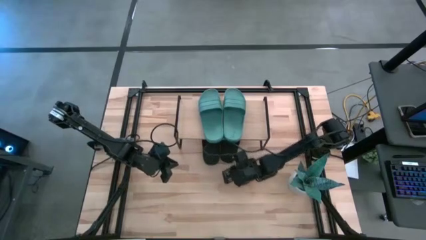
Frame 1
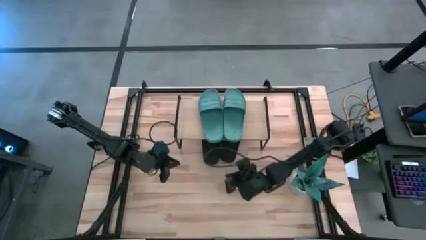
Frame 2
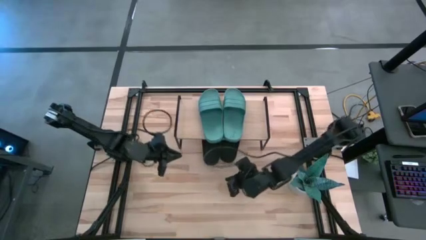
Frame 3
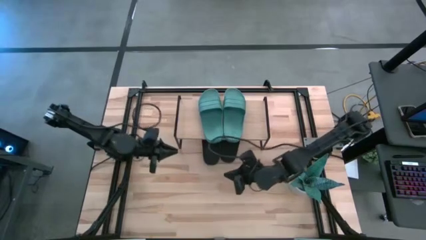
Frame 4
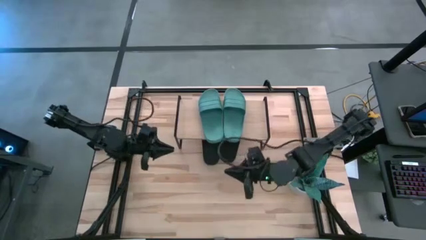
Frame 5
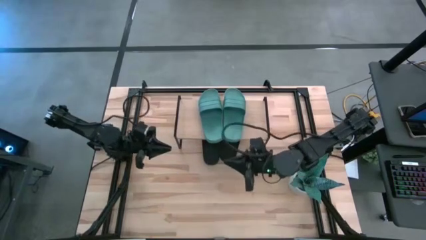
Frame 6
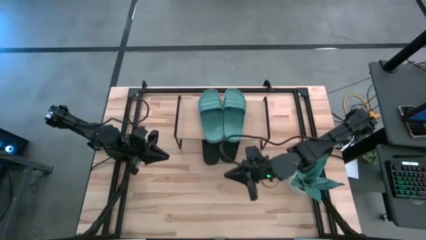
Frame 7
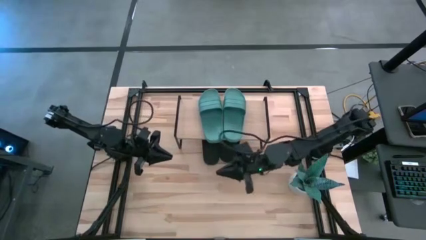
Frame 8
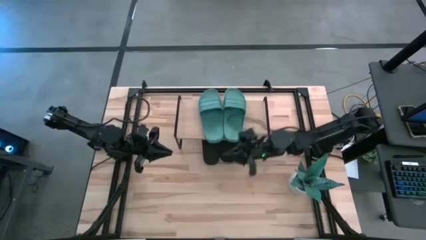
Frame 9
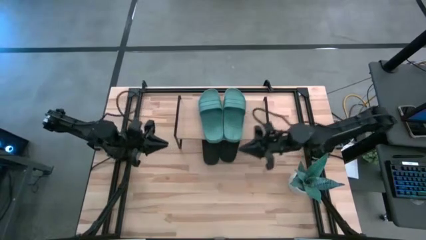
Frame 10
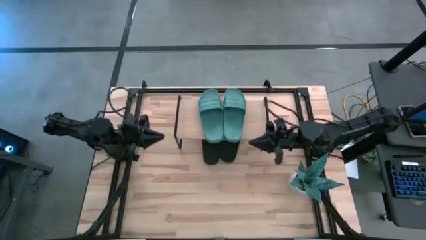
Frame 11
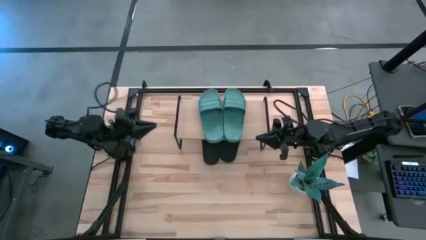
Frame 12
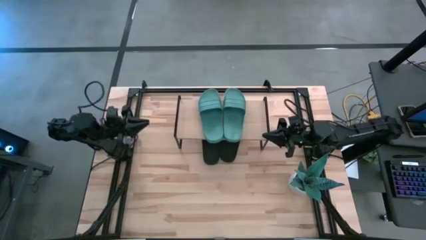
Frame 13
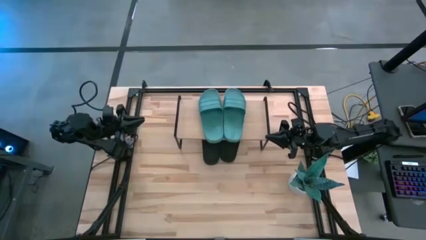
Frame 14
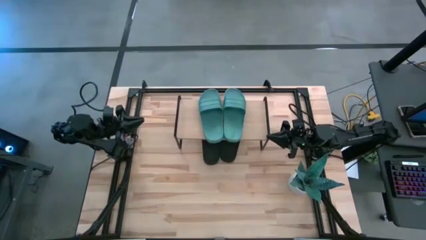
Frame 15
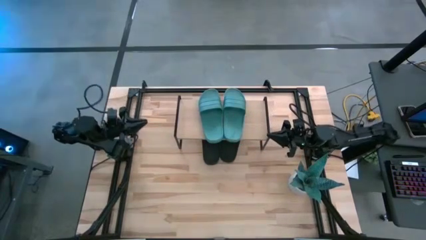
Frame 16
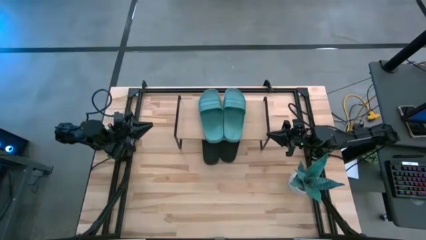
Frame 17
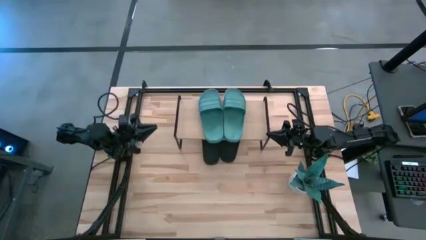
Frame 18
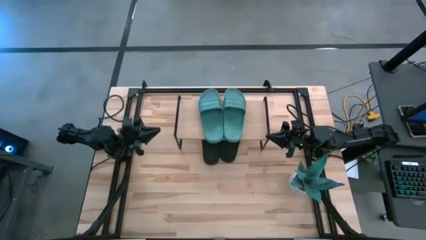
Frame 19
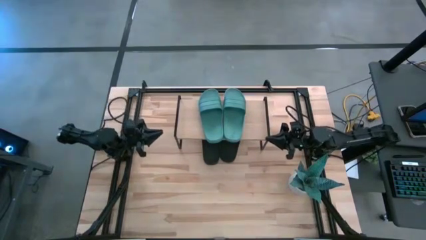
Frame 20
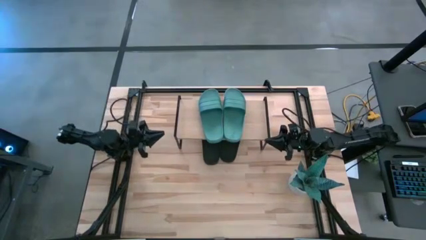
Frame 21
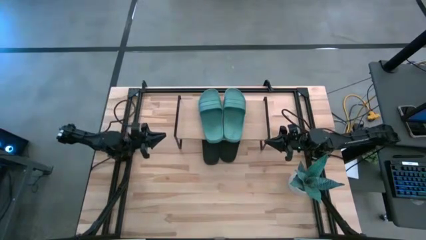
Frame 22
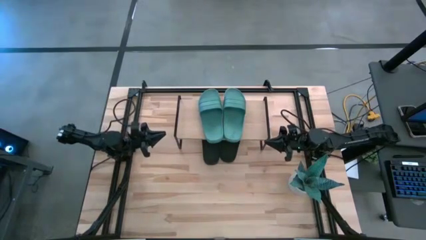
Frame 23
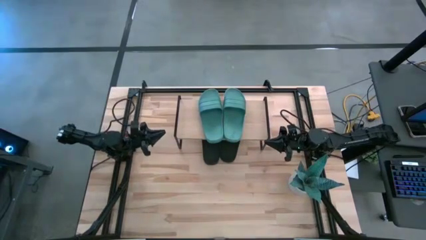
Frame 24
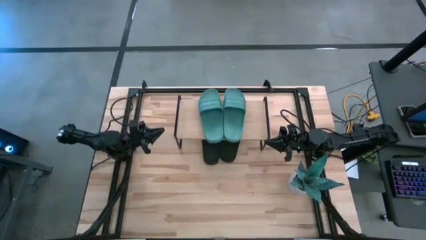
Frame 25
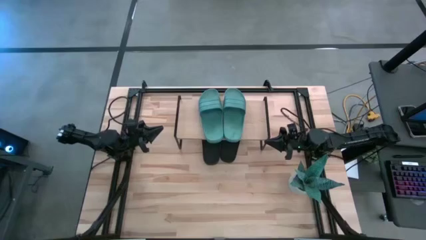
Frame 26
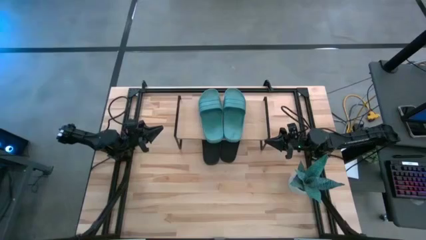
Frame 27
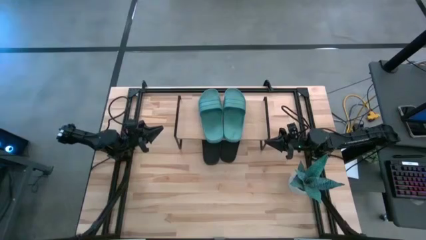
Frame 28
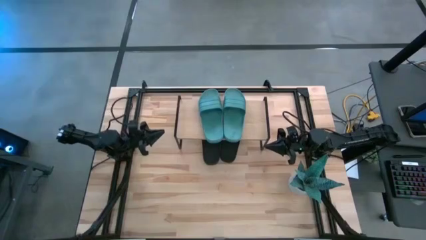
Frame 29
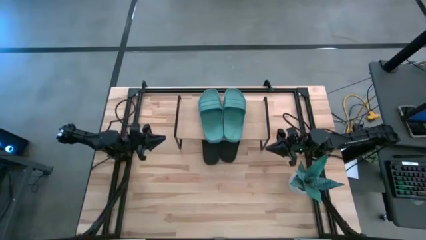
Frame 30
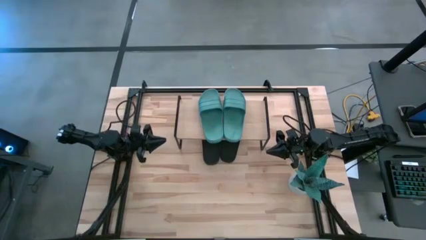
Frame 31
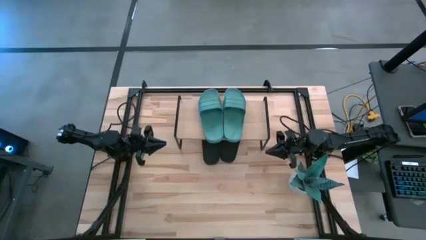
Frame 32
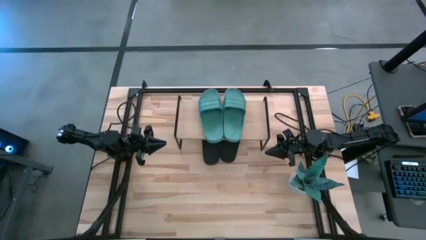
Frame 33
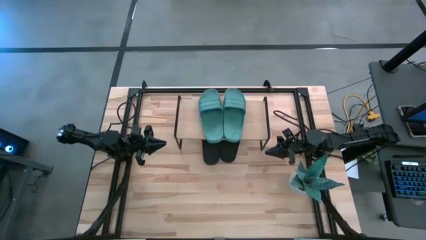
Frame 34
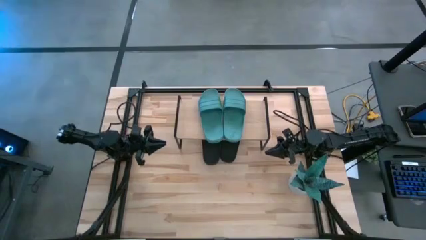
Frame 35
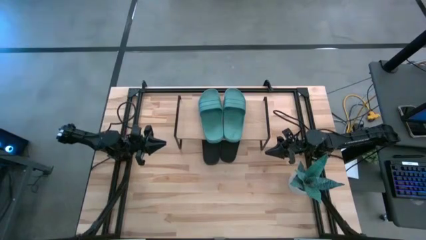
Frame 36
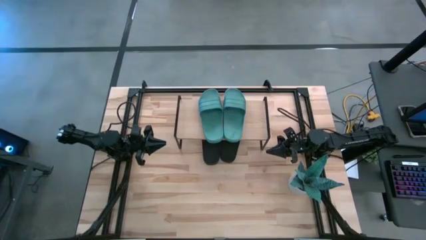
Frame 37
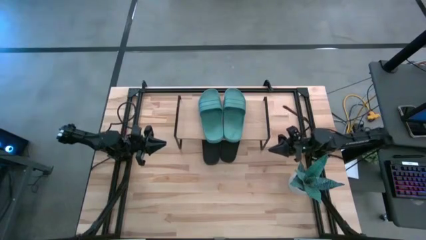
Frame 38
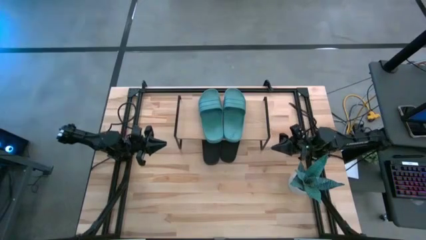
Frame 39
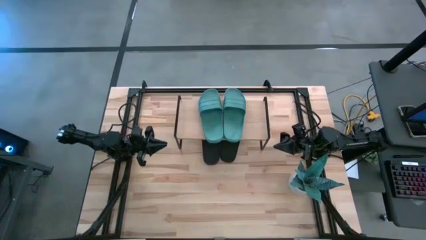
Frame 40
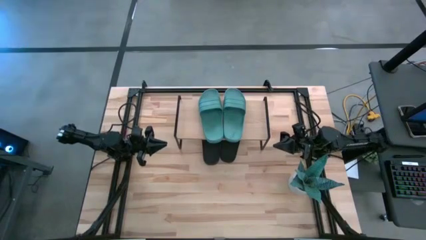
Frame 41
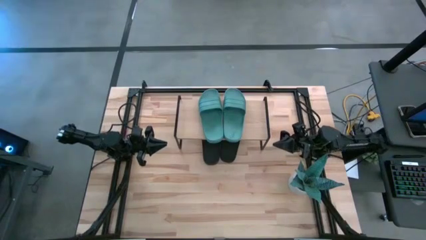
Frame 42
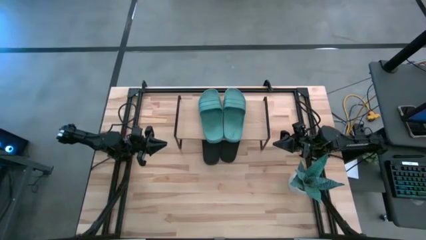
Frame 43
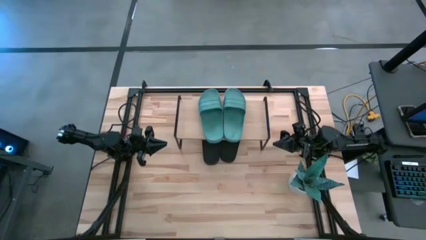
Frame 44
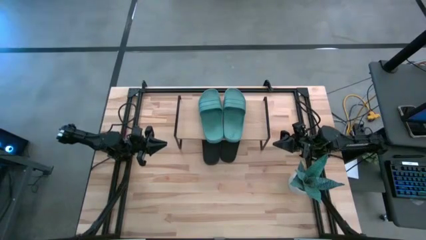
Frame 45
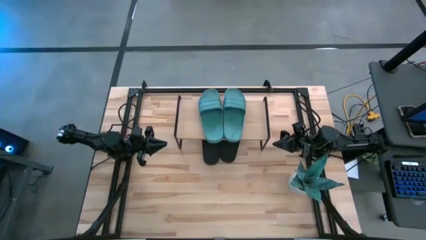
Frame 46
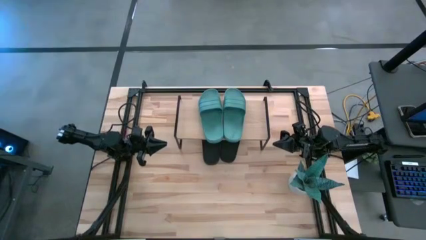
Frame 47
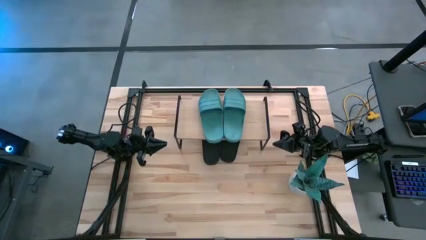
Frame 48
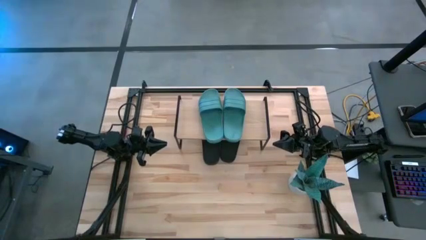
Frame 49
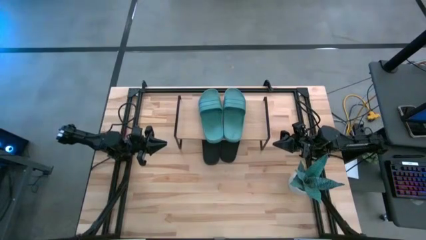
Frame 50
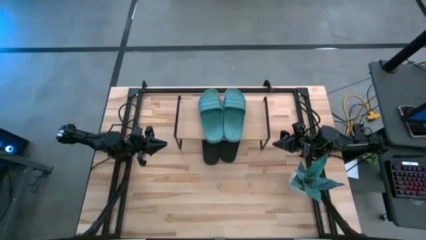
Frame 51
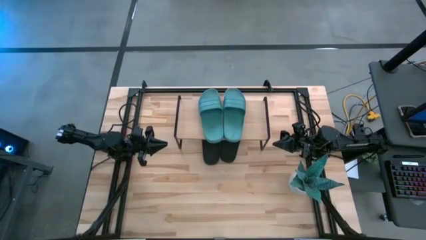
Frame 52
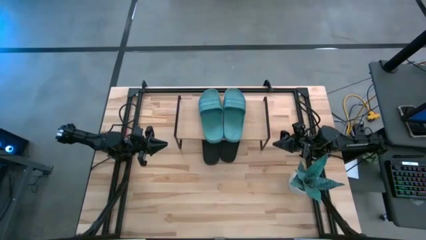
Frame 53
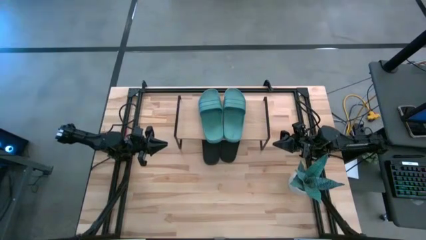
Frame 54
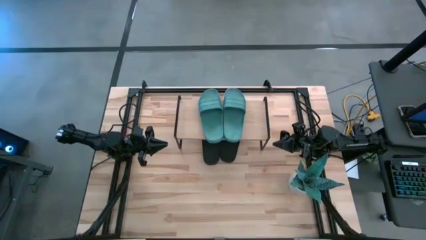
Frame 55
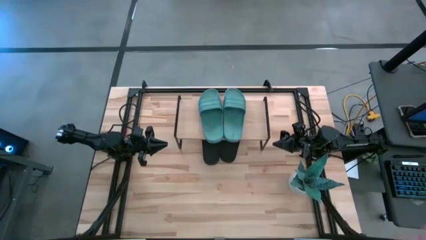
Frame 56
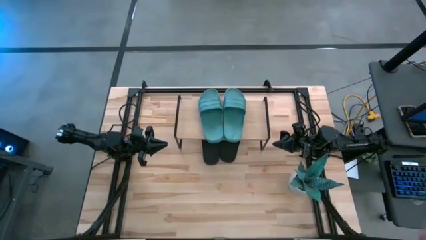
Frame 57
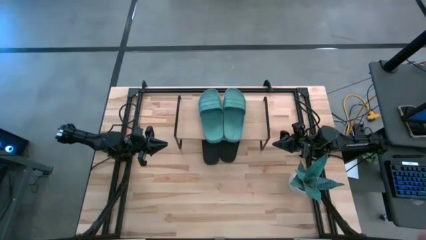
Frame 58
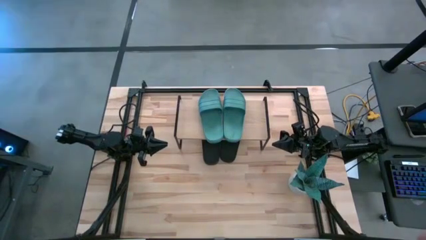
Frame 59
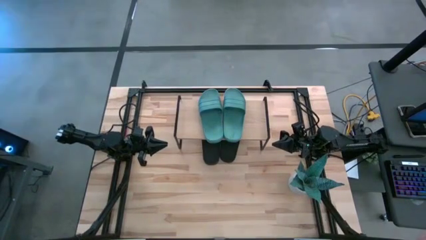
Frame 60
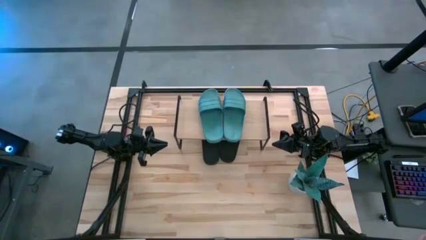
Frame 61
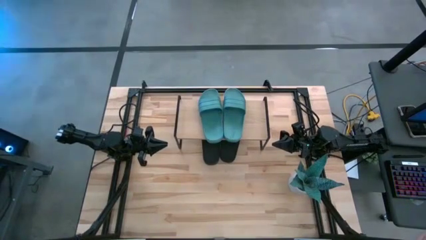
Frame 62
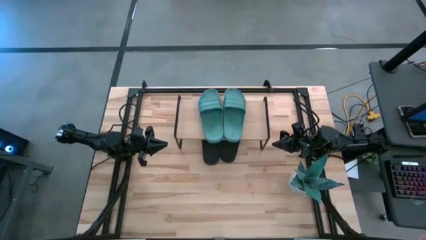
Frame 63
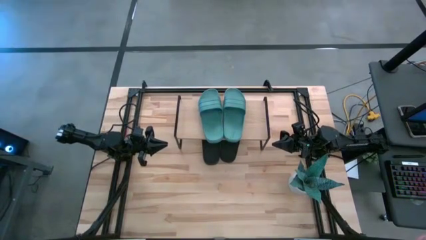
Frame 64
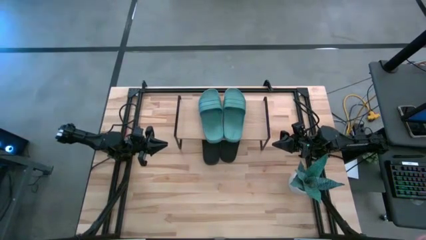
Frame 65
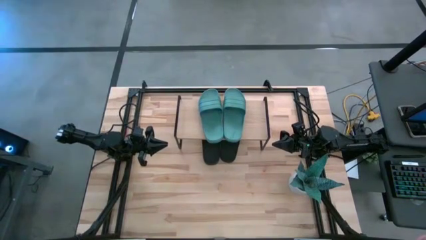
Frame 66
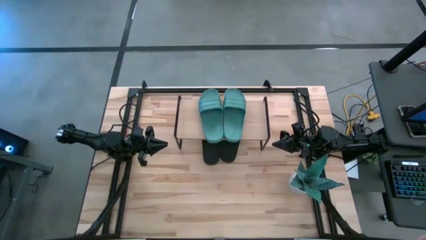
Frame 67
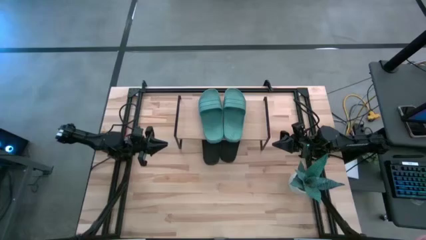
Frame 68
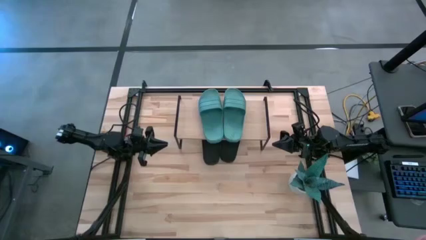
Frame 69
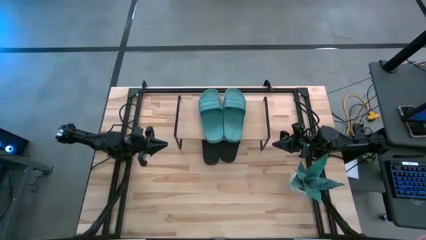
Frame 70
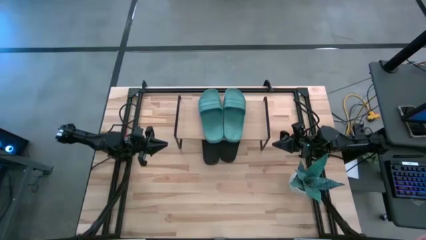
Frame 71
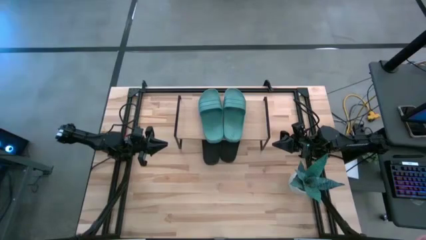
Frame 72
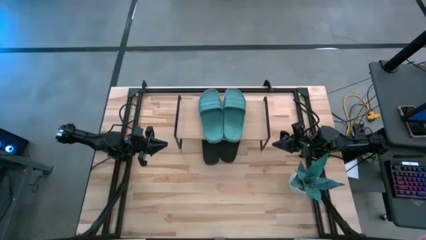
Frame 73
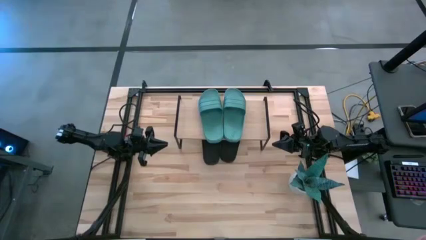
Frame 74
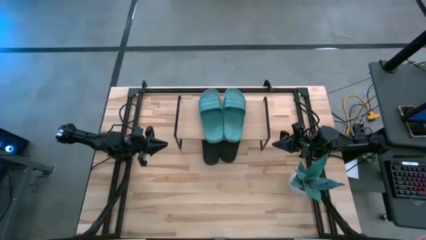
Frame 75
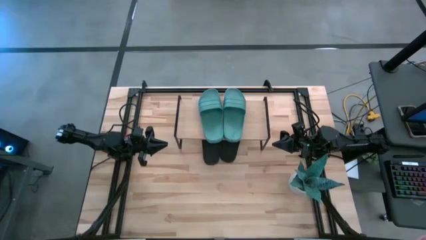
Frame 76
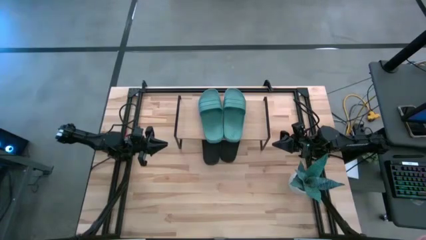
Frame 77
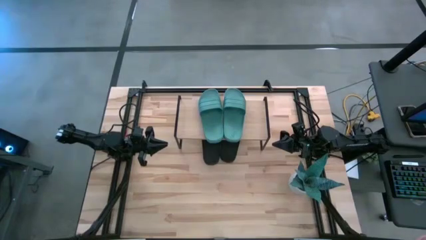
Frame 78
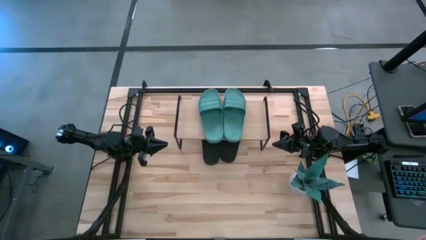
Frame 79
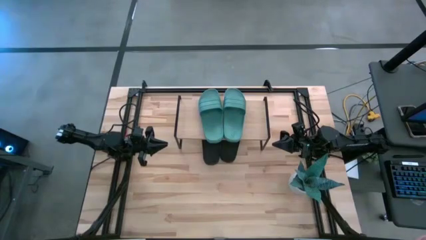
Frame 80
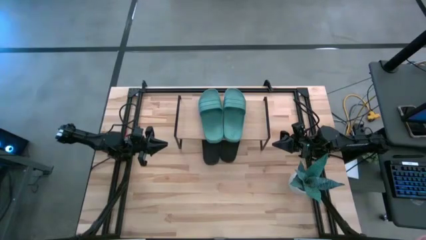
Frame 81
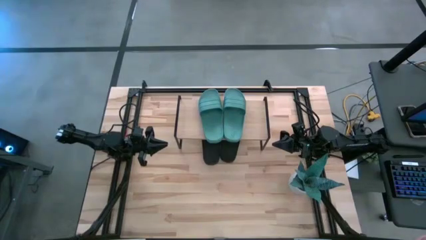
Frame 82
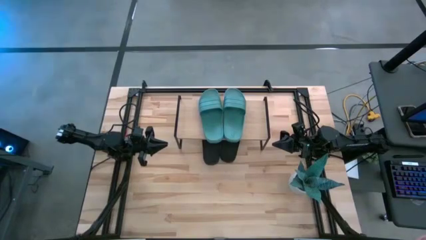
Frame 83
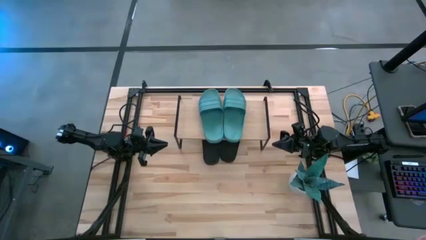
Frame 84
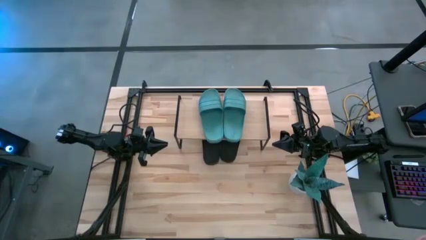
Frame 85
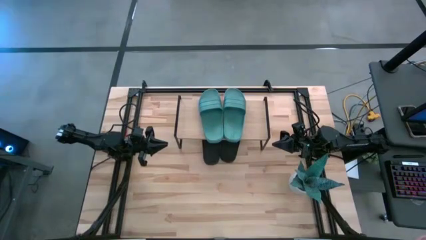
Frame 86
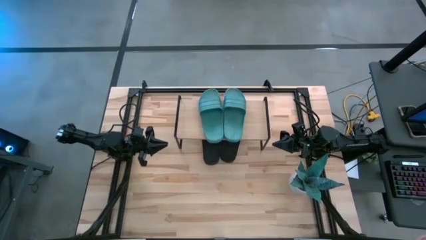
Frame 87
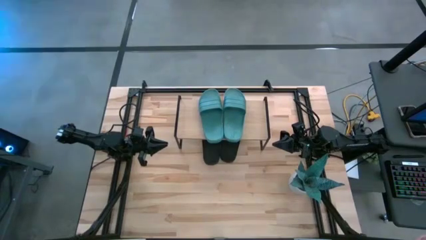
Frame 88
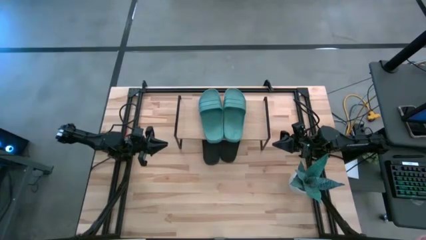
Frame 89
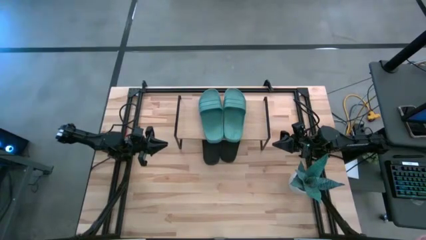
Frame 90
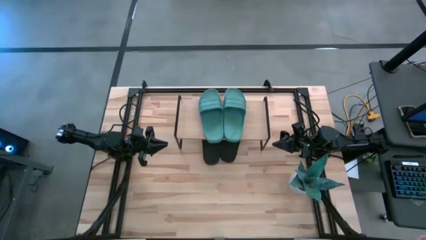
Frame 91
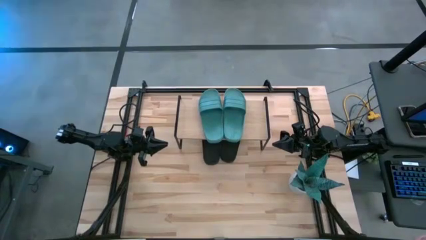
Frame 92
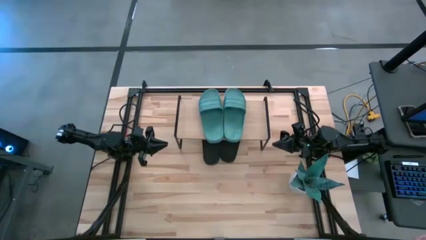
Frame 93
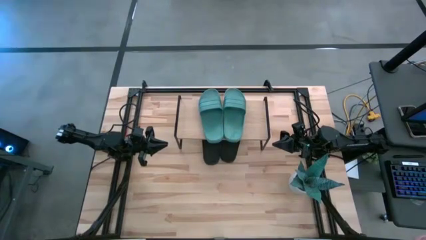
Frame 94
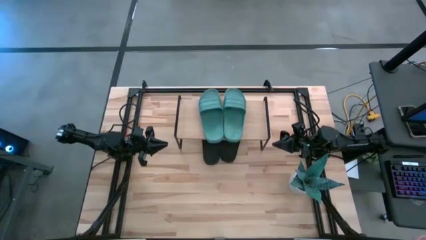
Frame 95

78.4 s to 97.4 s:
Task: Pick and place slides into the shelf
Return to Home Position
